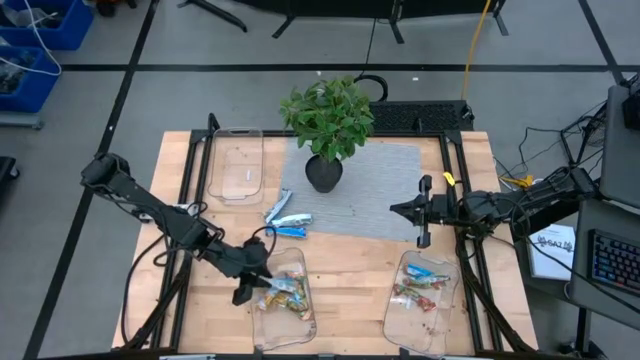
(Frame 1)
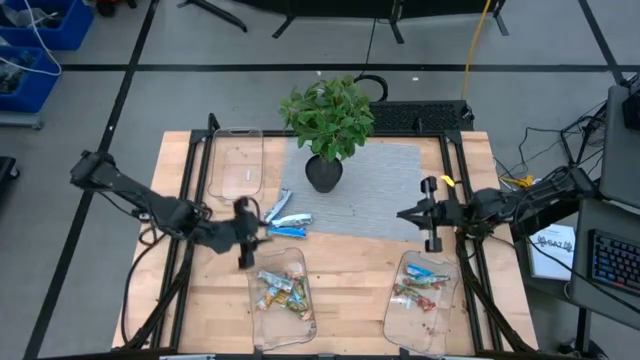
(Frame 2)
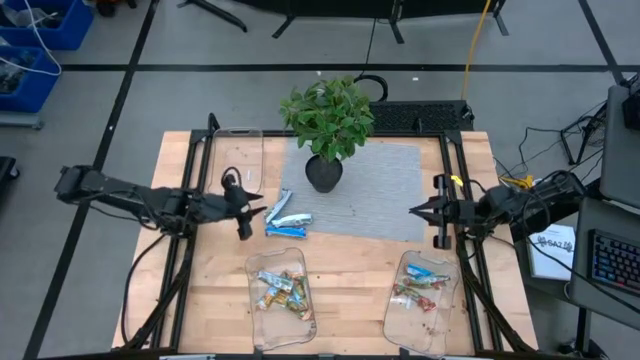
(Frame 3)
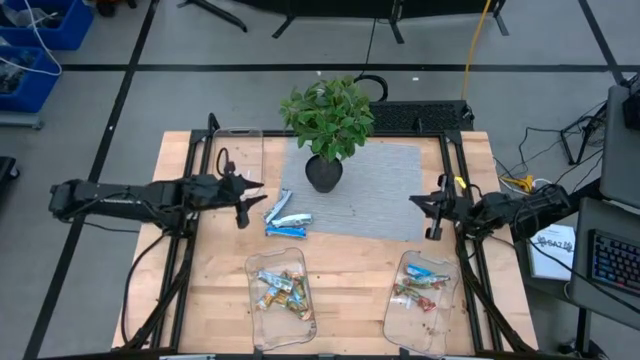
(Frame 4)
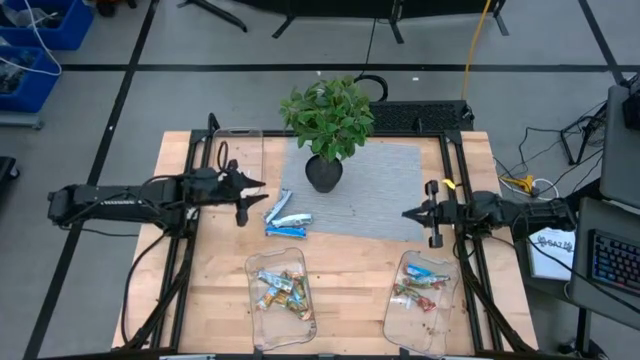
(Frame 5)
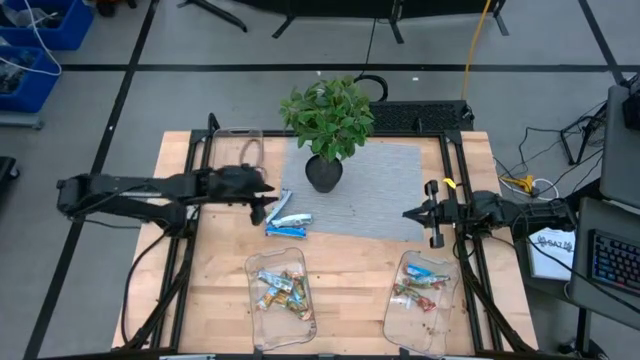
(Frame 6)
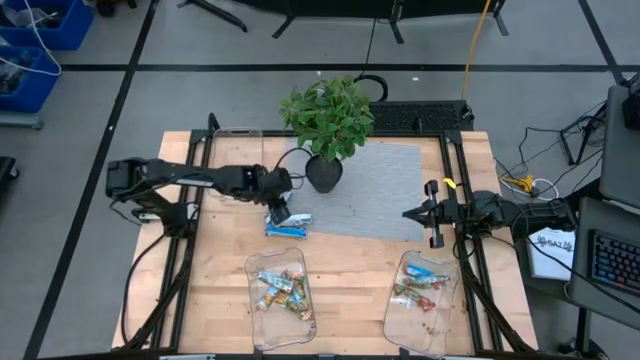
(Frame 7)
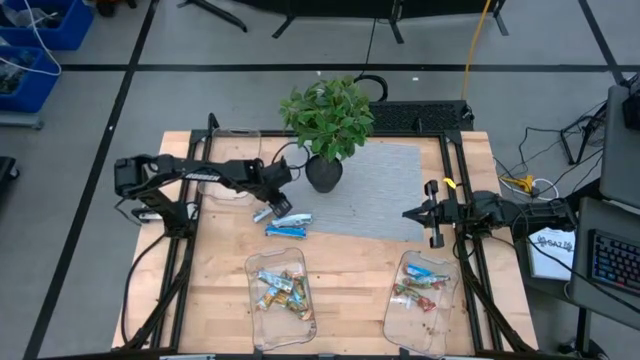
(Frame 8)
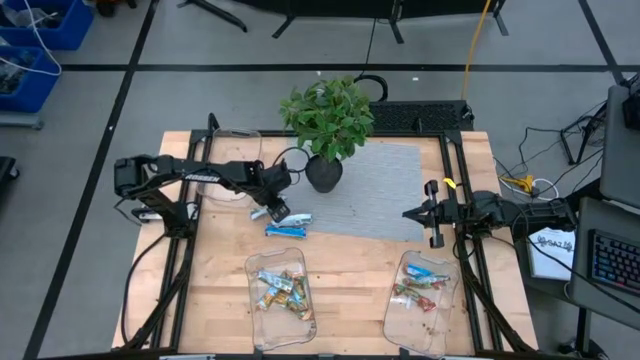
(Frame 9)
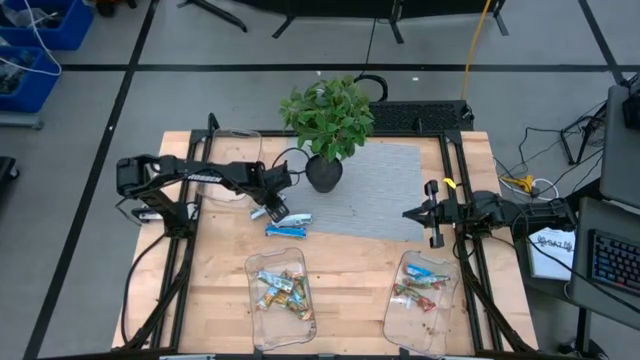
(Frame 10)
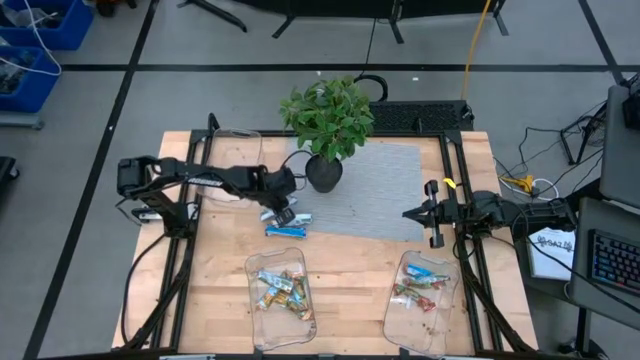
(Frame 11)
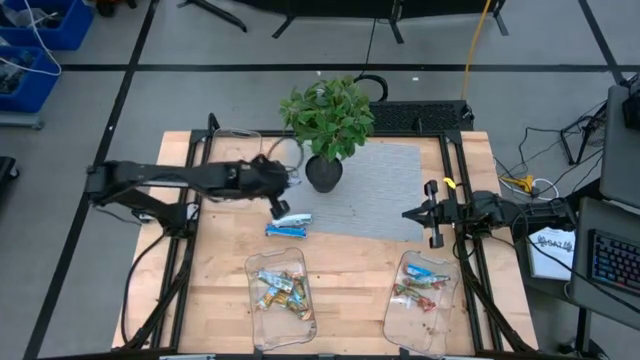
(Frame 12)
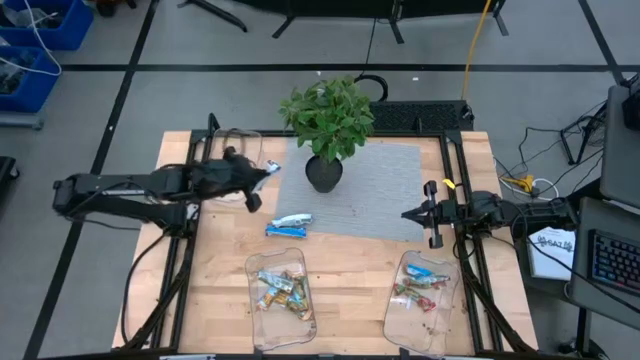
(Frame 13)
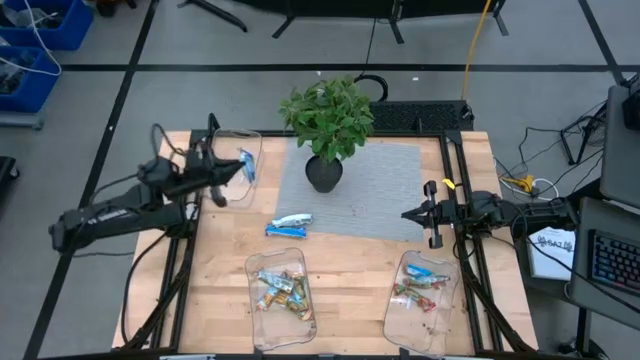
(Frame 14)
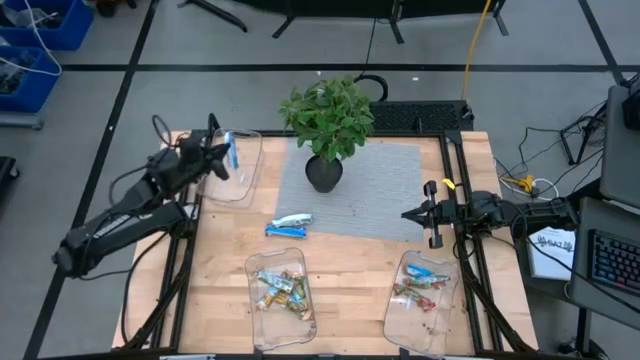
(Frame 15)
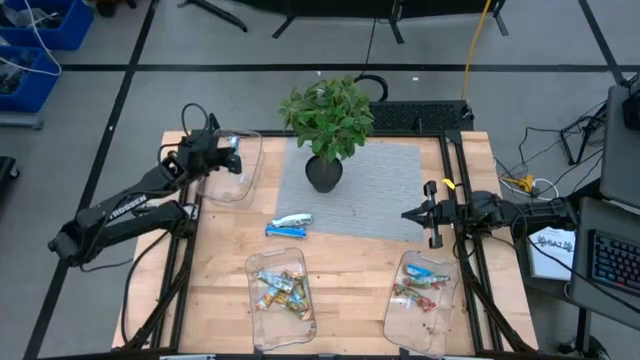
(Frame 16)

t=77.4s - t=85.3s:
Task: Pick and place Granola Bars by type
Put the blue granola bar into the top transparent bin

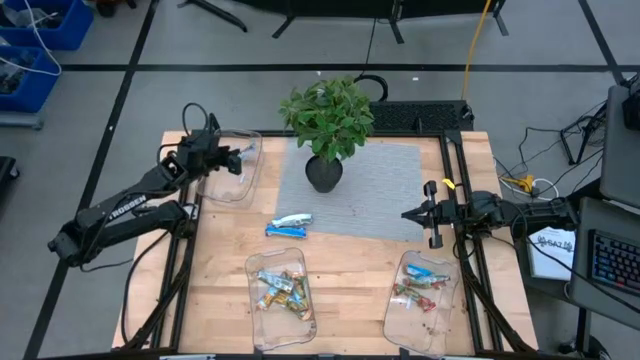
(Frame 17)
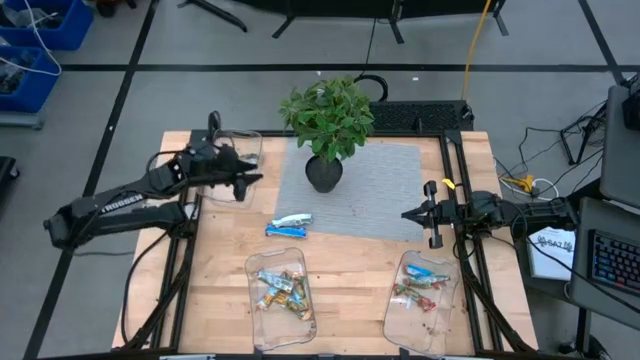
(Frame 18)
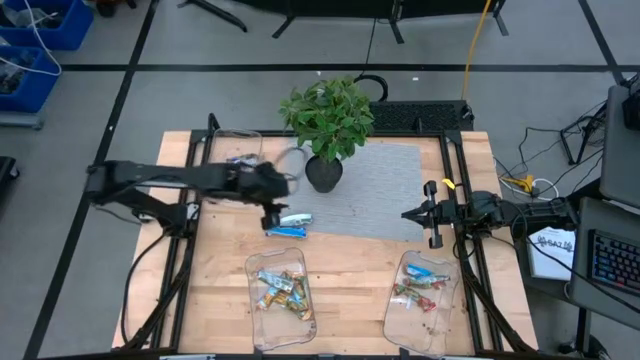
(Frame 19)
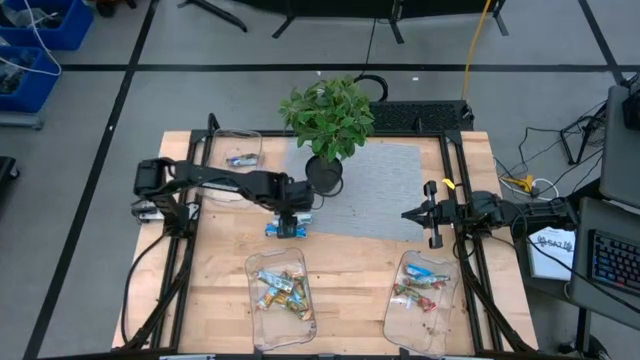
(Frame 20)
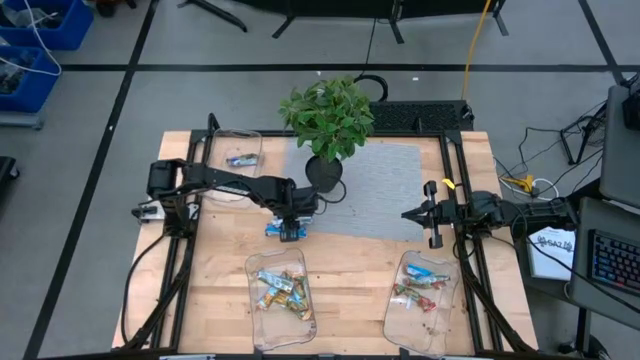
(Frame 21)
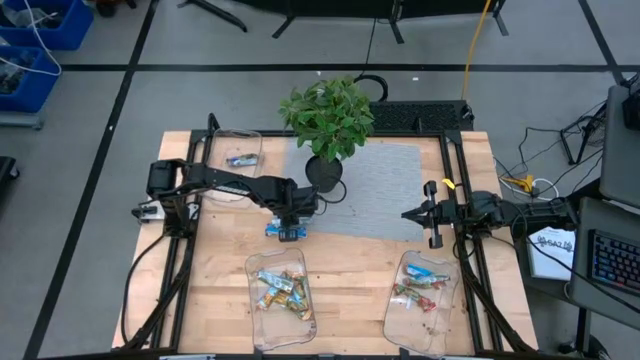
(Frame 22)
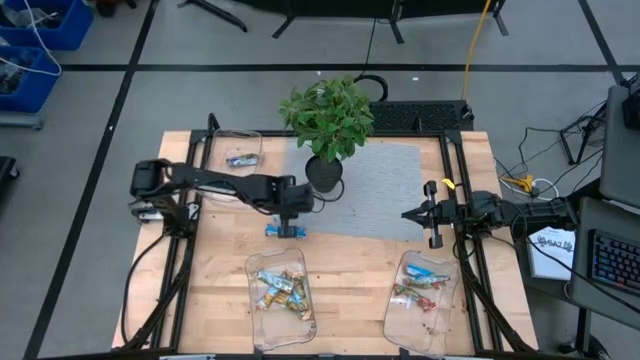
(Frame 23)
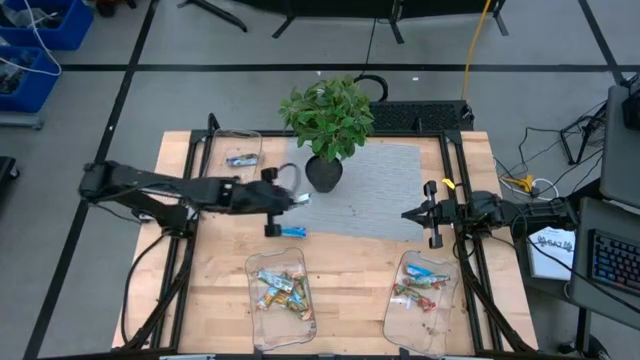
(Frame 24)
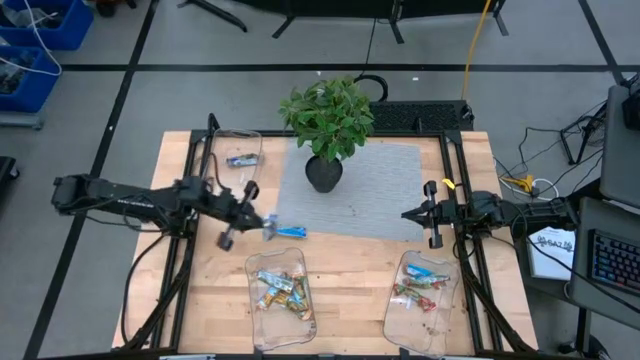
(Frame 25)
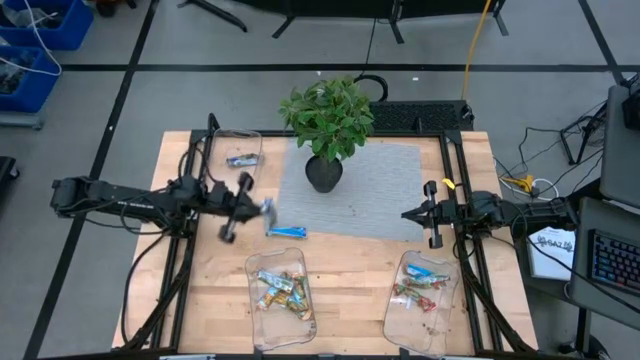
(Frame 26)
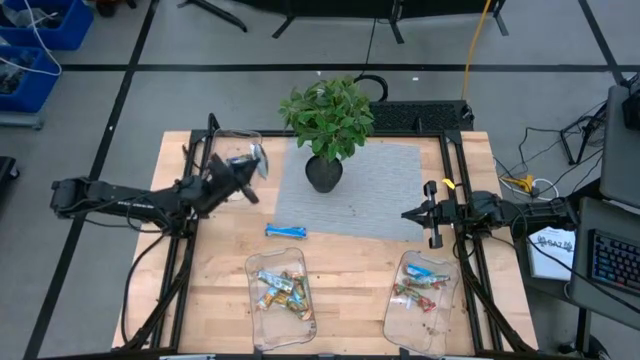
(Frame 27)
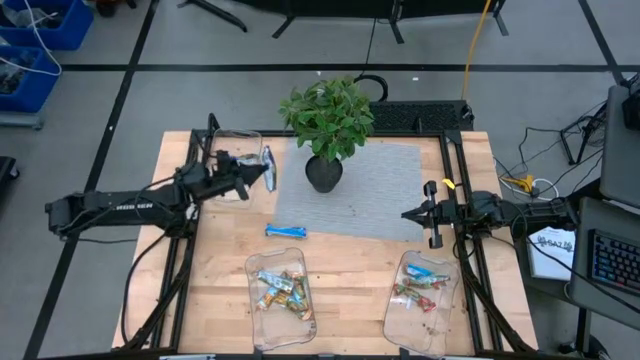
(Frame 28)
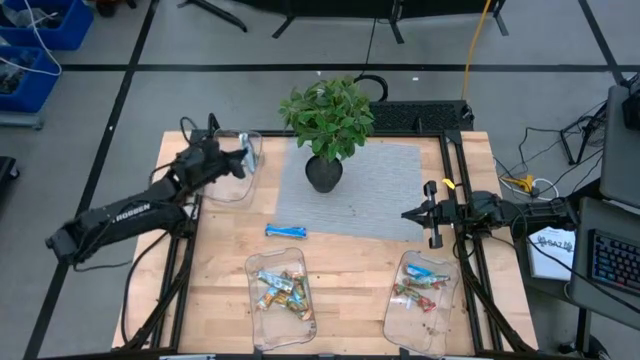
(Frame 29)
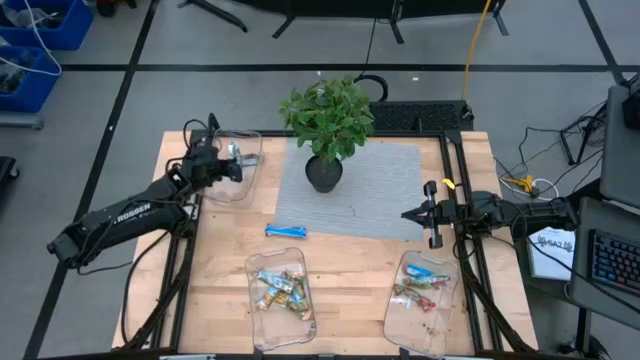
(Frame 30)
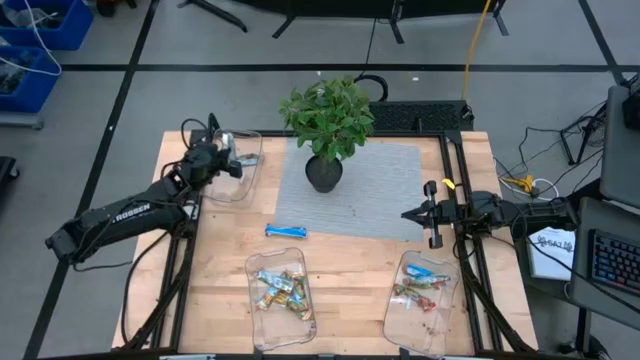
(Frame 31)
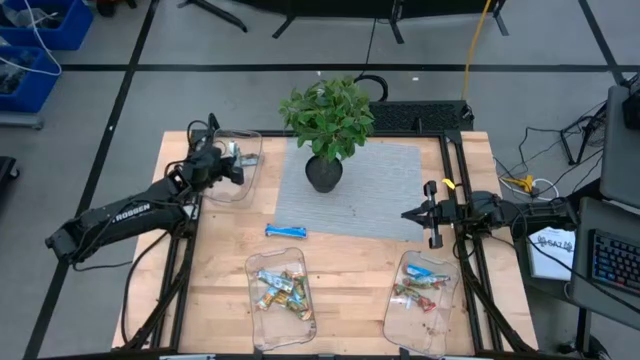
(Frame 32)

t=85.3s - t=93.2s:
Put the blue granola bar into the top transparent bin

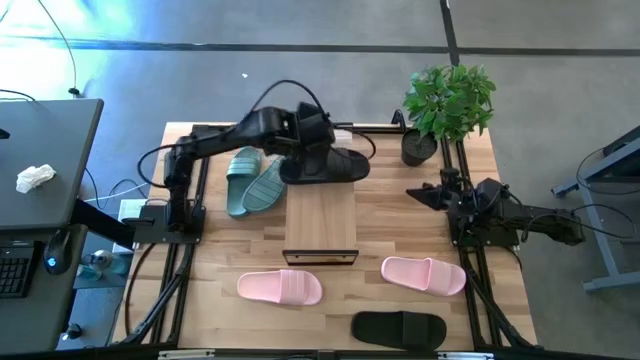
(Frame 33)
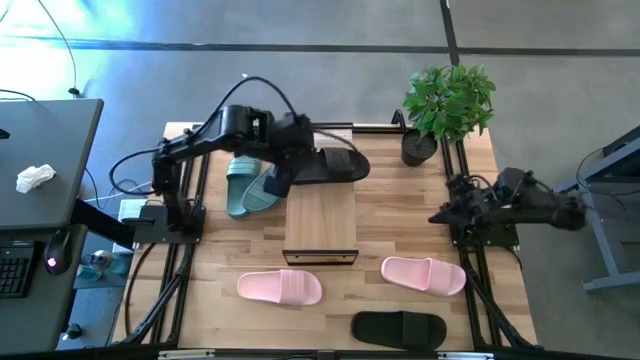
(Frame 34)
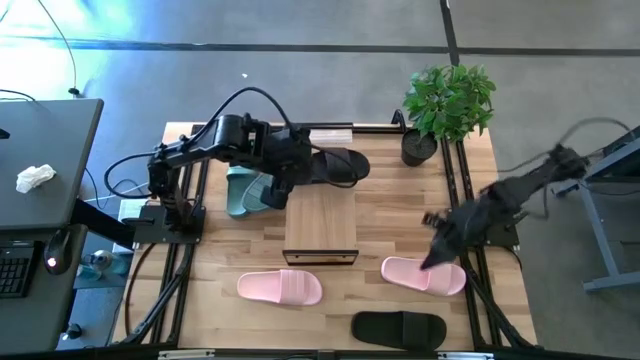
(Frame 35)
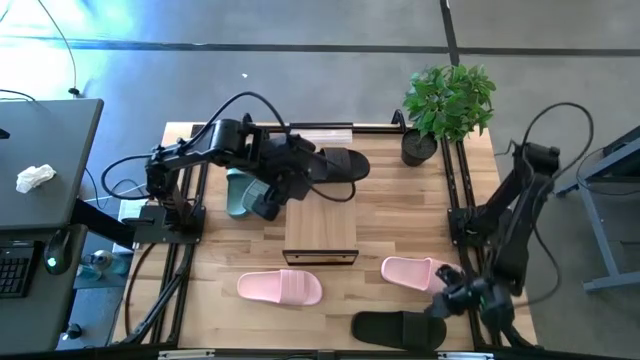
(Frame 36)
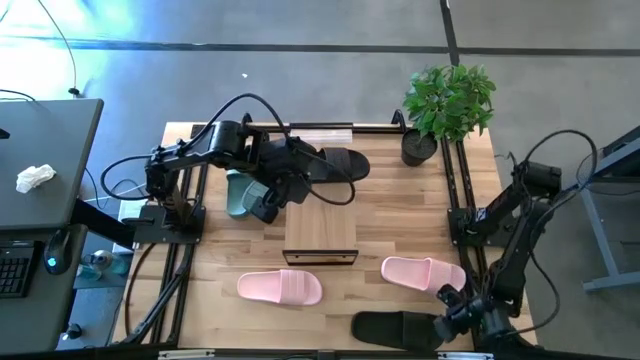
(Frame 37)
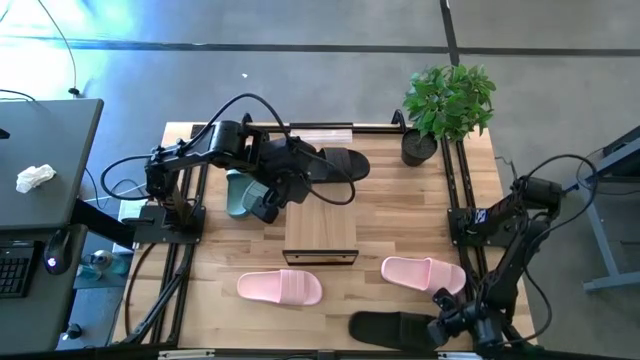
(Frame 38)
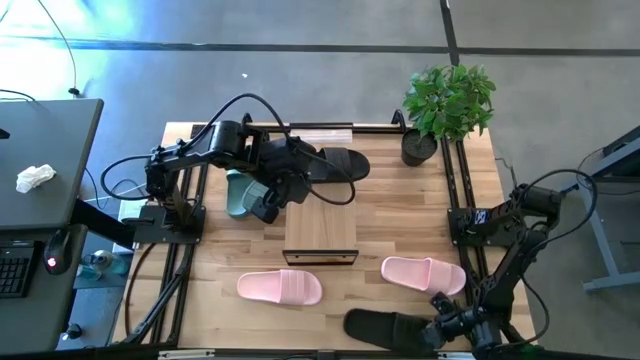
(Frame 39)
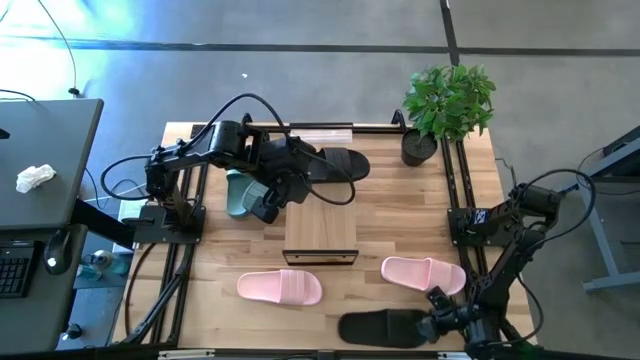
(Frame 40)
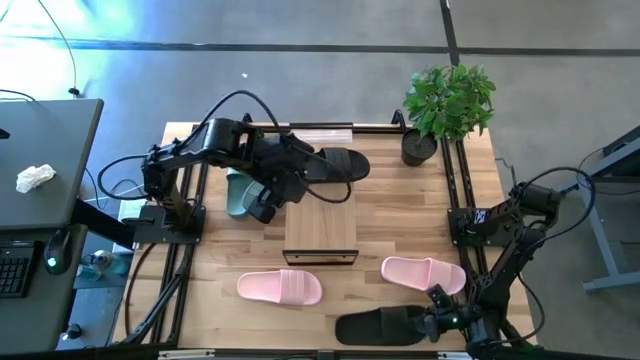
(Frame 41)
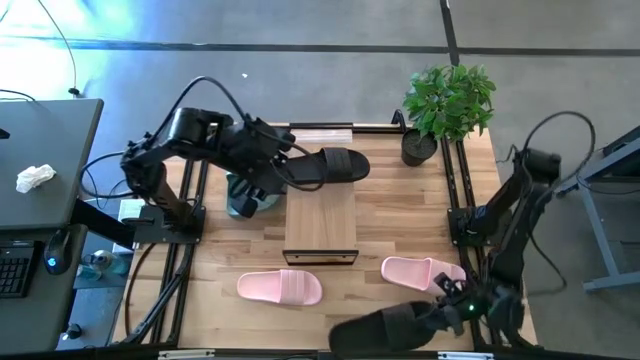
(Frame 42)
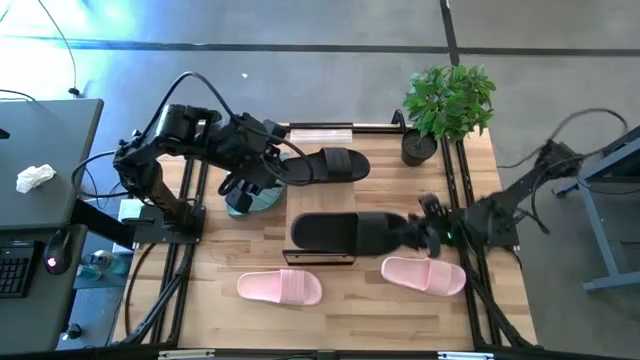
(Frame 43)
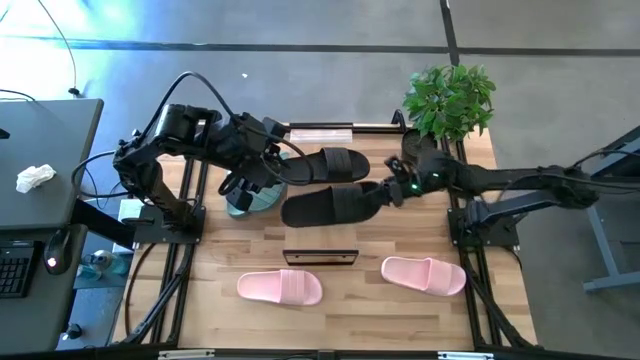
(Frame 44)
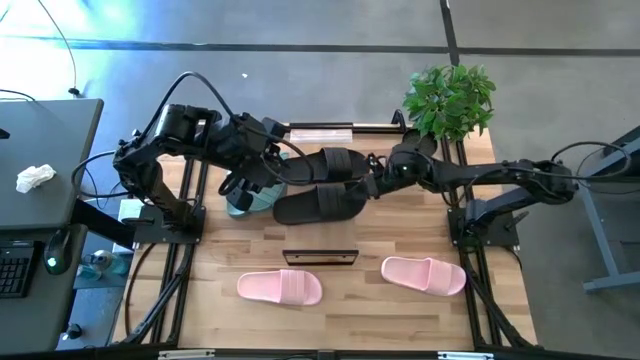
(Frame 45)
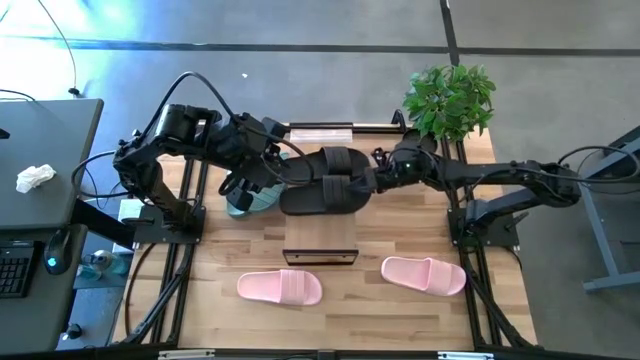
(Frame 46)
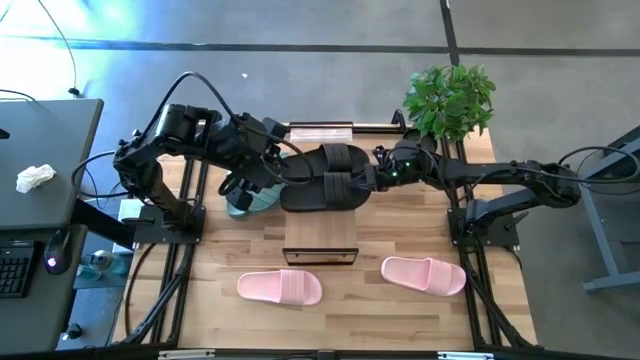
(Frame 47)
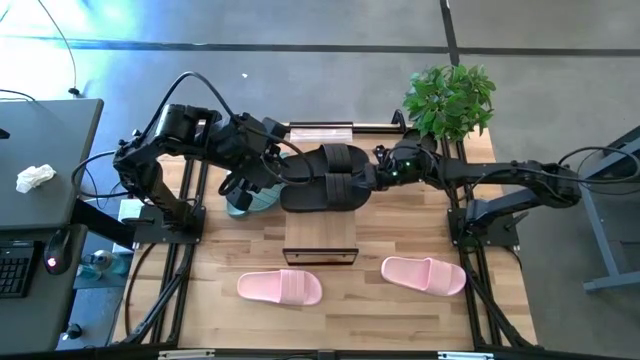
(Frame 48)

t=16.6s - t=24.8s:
Task: Pick and place slides into the shelf
Put the black slide on the shelf
